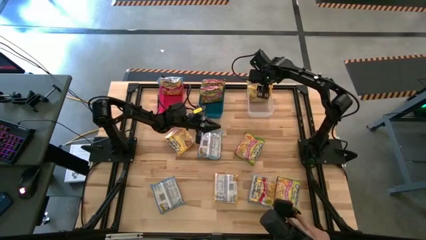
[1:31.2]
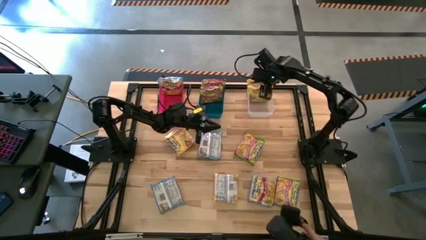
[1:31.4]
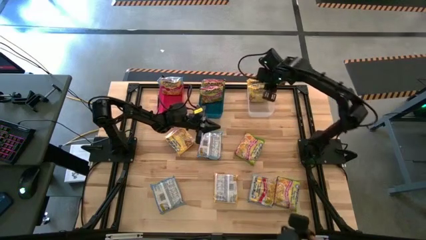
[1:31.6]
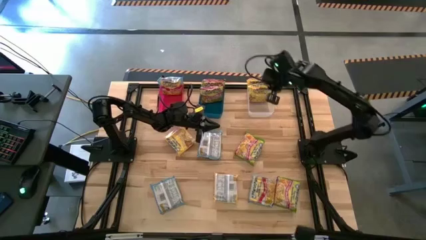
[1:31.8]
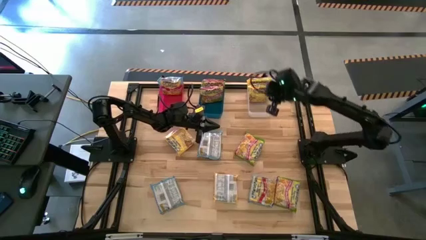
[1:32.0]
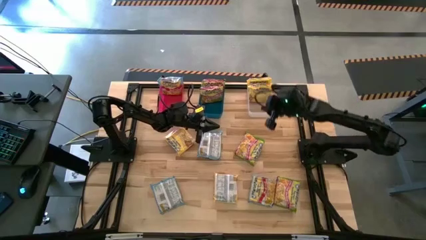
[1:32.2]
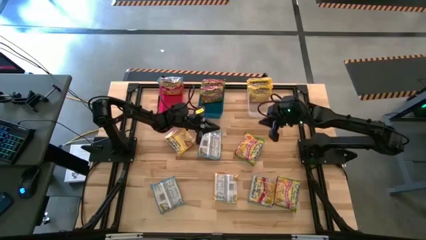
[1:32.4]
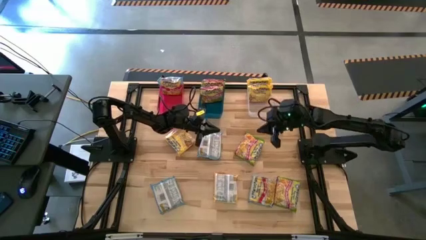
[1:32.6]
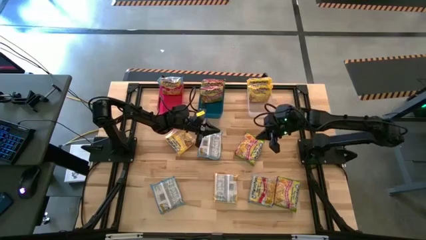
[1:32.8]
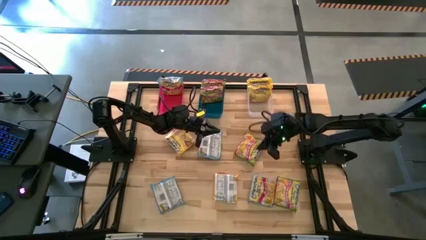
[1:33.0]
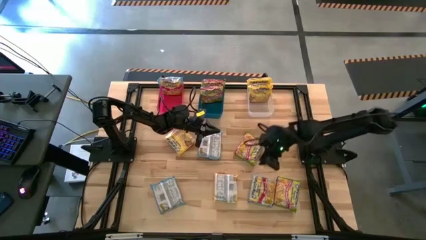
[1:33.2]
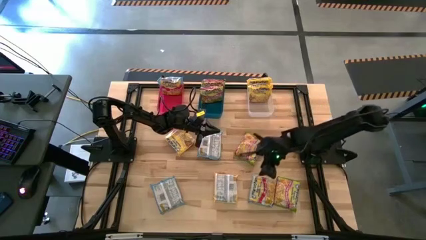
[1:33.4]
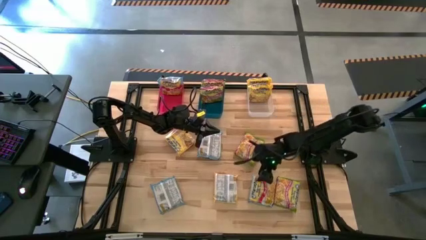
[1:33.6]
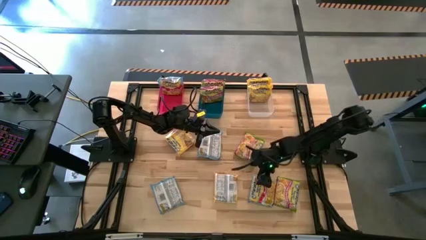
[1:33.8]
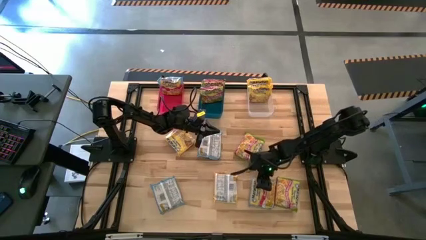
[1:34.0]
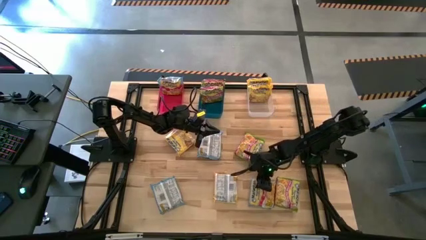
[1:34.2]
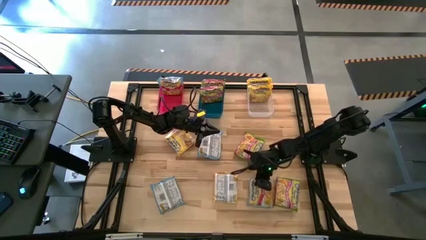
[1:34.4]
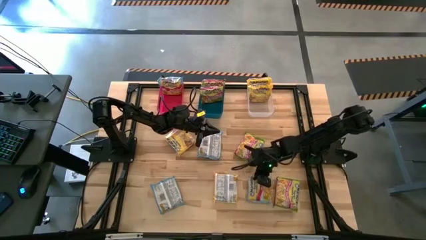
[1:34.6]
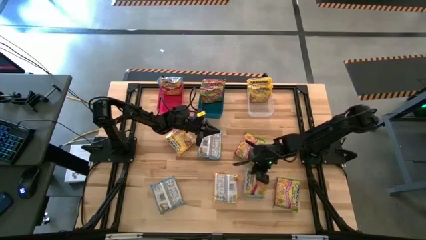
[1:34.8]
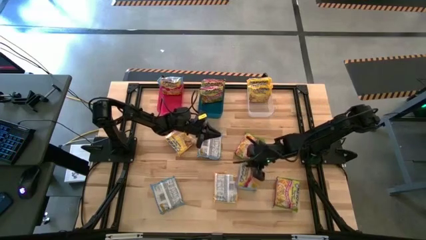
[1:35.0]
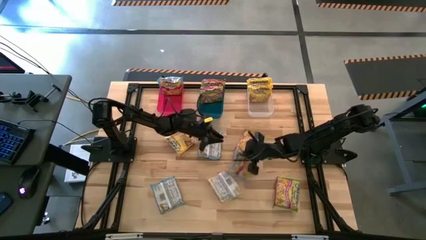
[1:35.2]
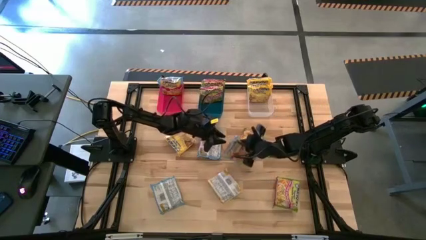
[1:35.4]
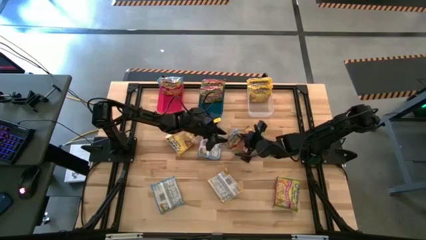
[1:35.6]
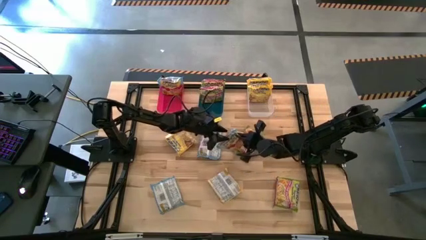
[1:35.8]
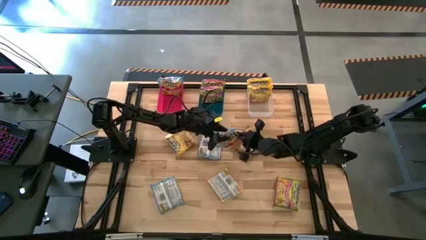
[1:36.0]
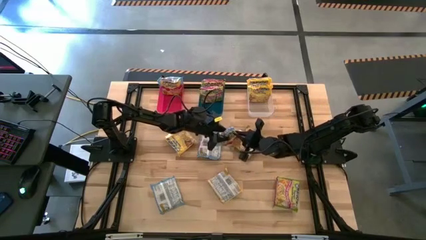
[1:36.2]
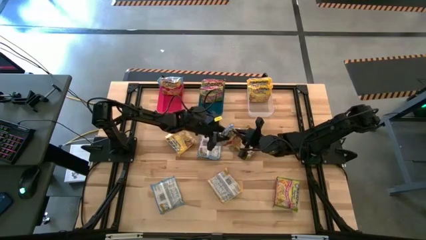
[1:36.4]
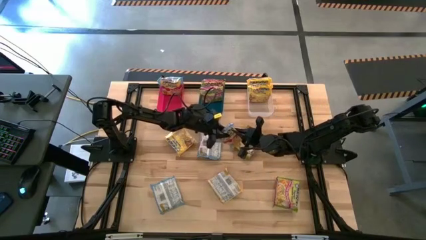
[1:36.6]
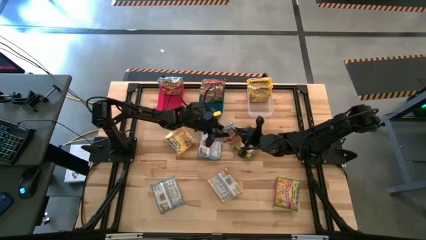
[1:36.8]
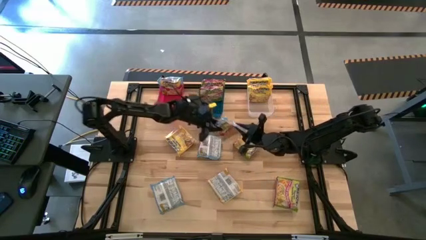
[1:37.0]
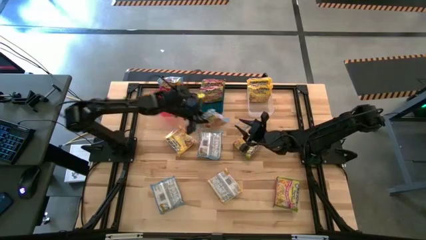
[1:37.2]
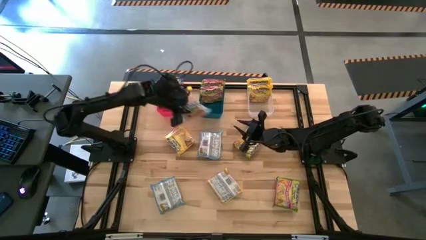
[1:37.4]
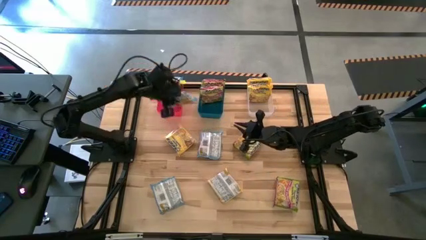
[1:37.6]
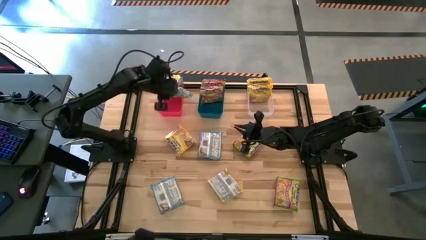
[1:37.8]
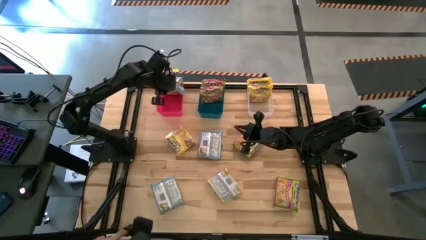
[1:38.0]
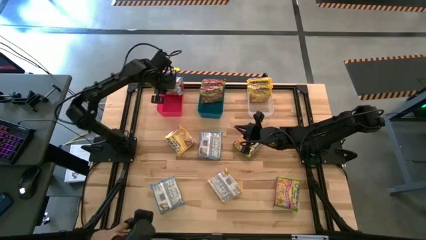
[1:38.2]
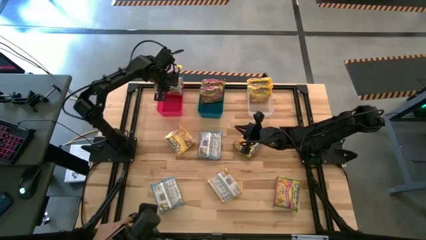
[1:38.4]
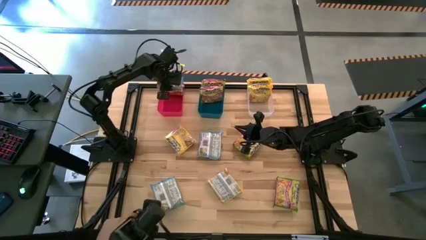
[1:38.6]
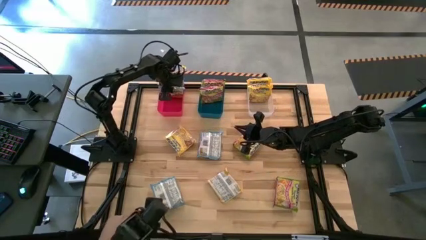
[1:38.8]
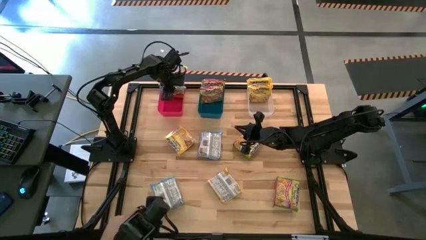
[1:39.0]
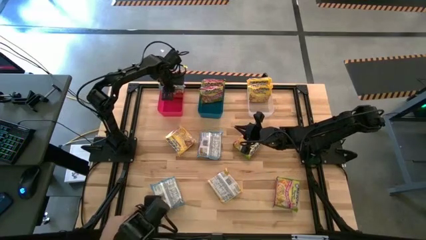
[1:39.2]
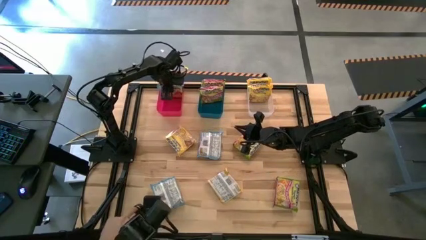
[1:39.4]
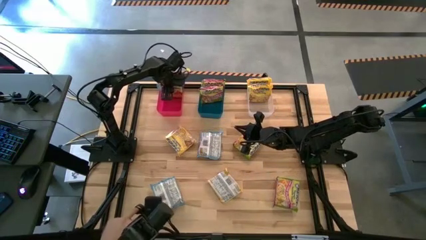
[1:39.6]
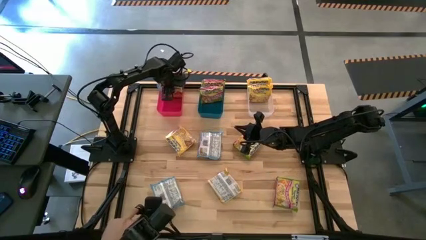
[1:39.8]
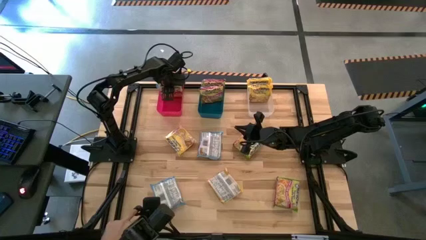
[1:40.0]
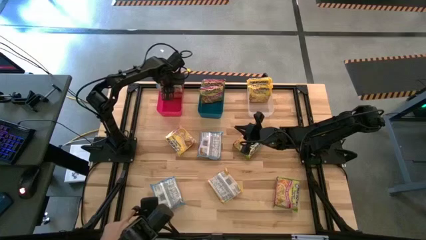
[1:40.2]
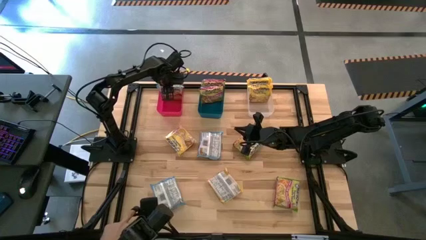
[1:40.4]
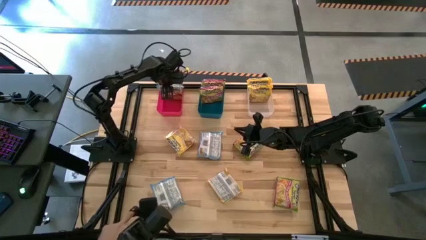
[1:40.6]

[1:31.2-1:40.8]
Task: Sort Maruchan noodles
Put the bottom right blue noodle pack into the red bin
